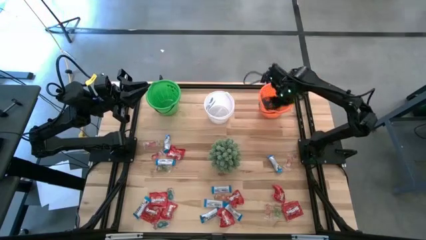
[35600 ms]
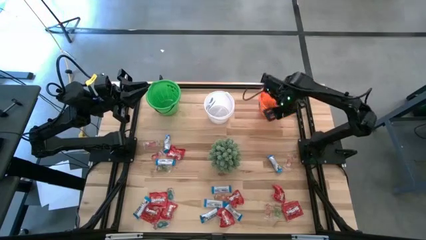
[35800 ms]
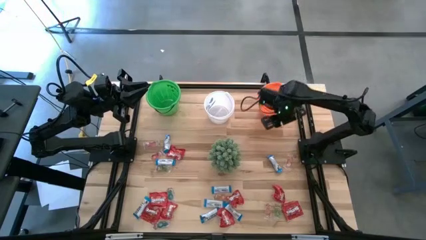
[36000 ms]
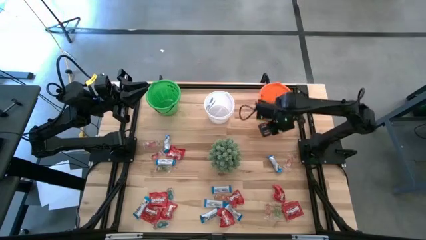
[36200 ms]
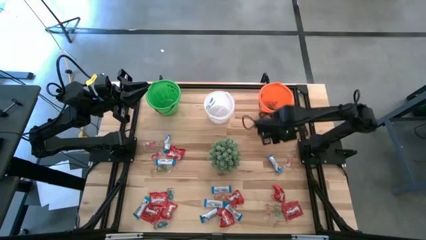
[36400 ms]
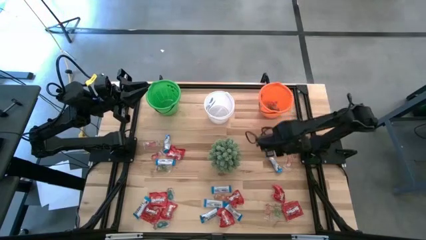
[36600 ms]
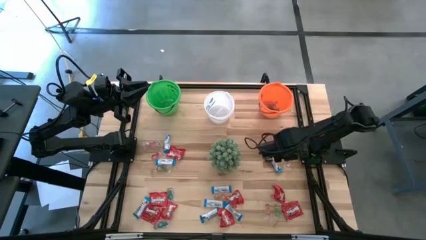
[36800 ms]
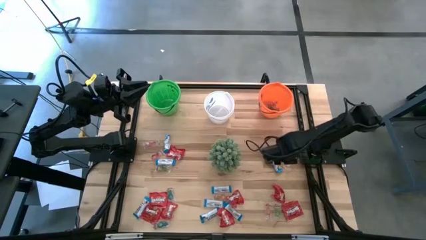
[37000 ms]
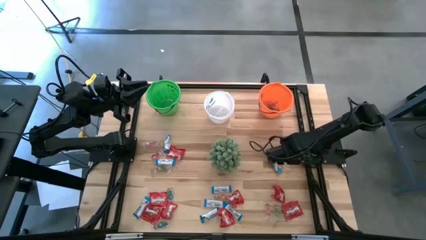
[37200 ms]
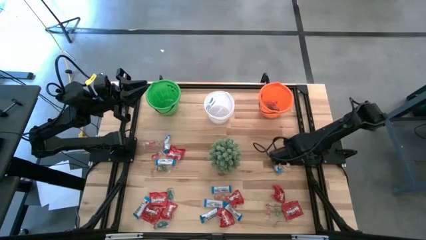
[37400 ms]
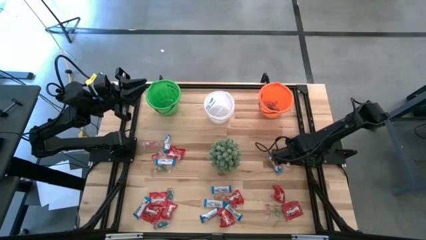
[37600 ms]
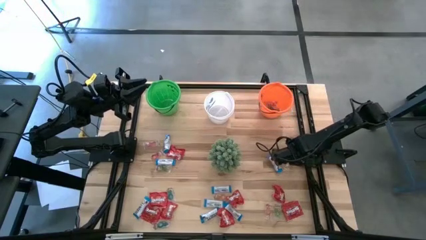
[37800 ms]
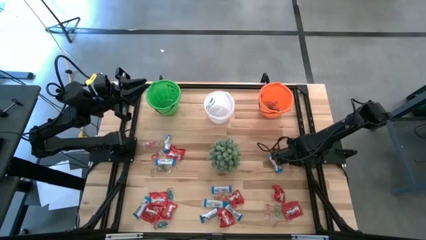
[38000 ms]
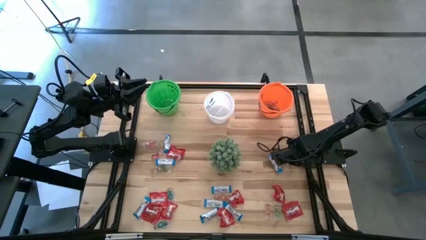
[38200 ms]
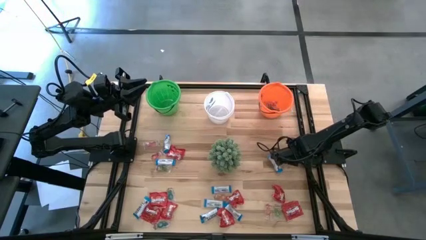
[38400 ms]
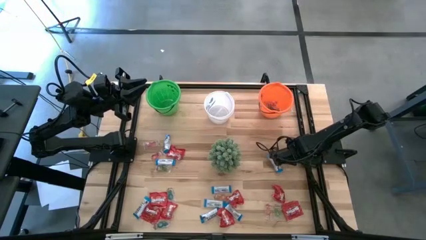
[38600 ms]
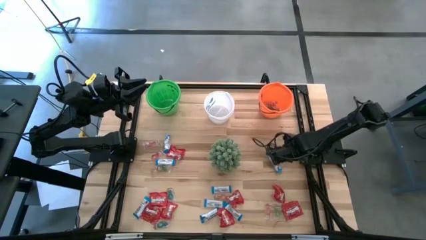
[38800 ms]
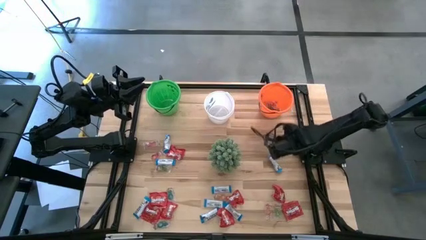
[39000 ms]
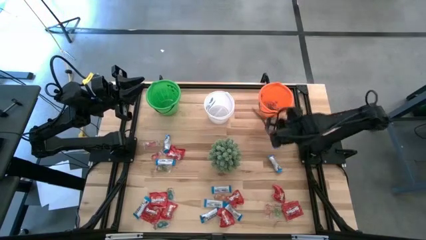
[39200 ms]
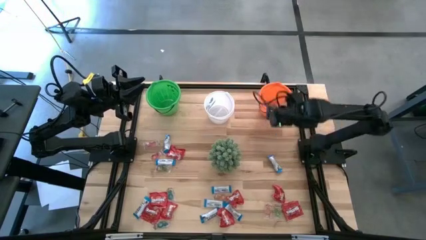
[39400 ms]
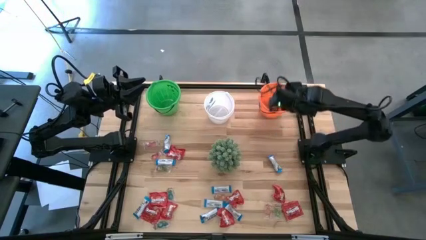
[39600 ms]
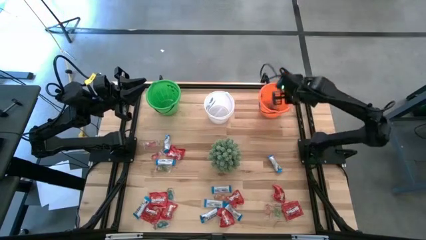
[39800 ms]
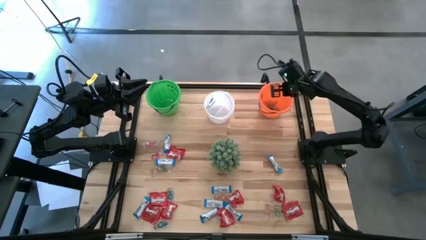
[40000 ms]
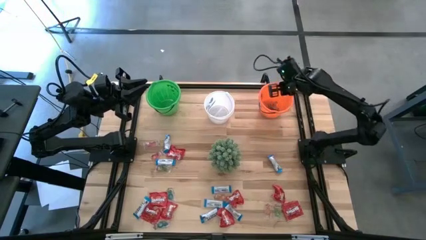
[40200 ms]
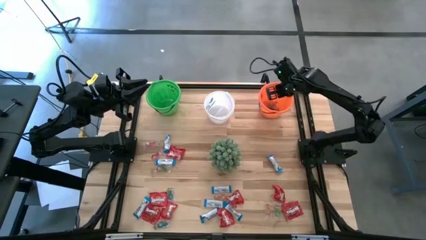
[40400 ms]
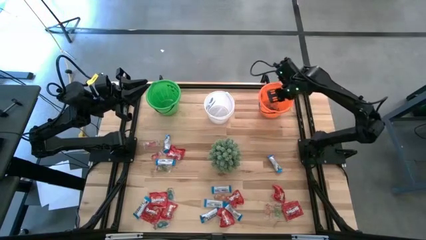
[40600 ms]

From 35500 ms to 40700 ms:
Task: Sort candy
Put the transparent candy into the orange bucket

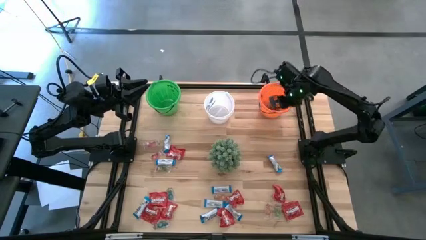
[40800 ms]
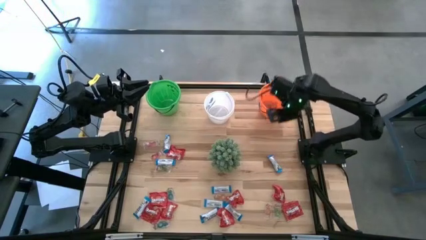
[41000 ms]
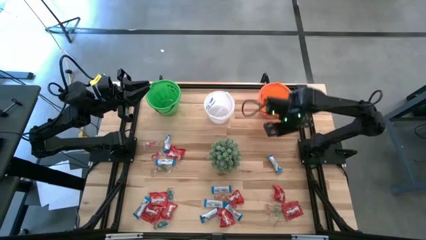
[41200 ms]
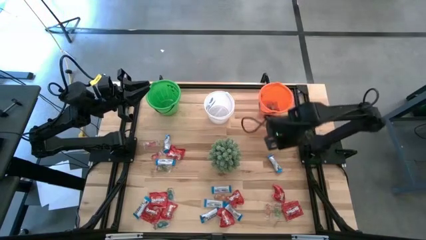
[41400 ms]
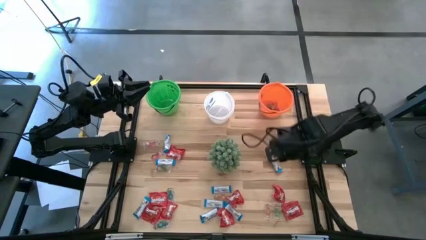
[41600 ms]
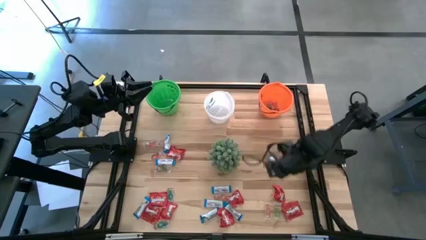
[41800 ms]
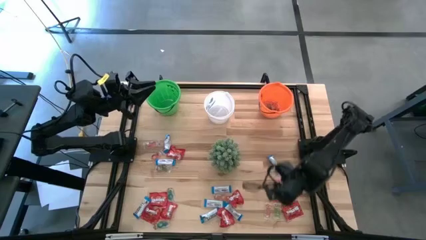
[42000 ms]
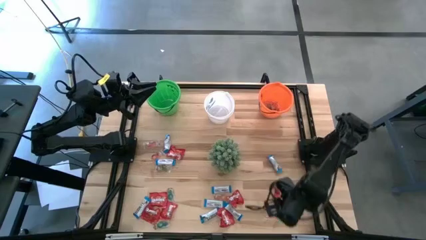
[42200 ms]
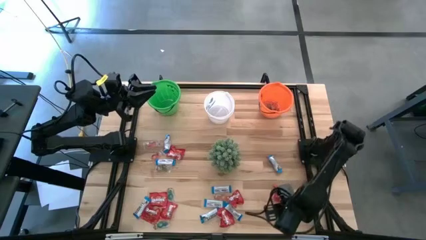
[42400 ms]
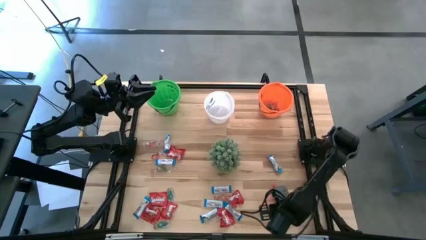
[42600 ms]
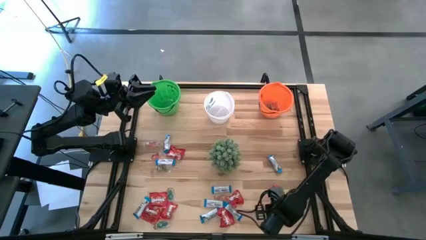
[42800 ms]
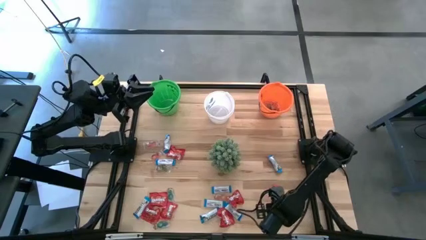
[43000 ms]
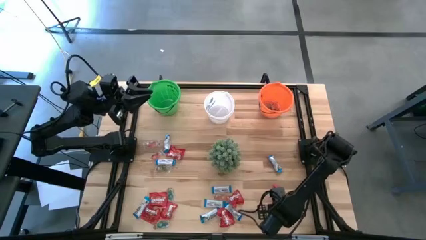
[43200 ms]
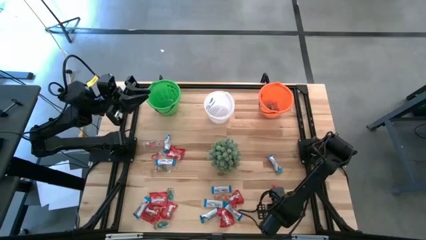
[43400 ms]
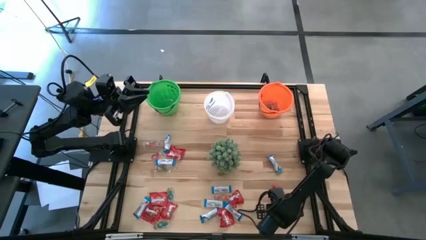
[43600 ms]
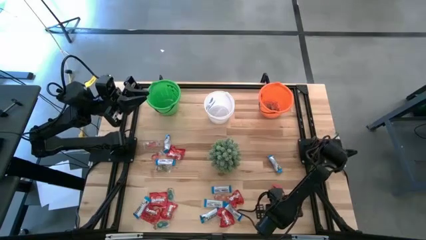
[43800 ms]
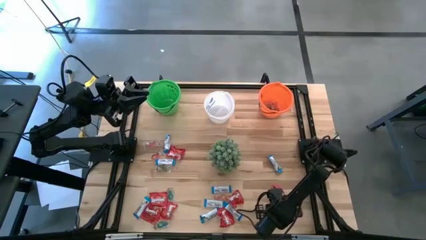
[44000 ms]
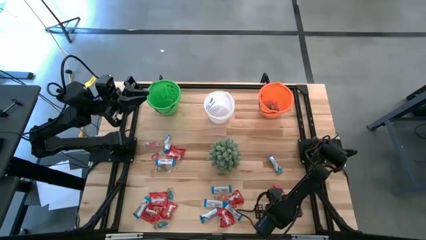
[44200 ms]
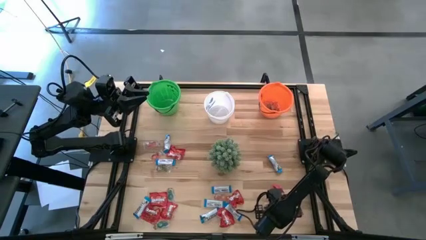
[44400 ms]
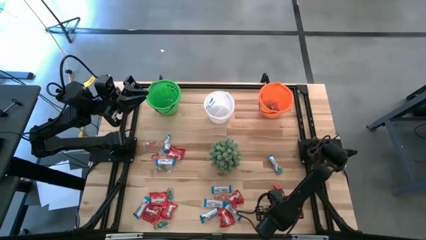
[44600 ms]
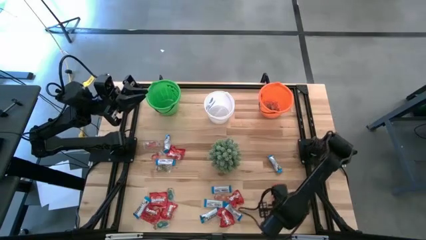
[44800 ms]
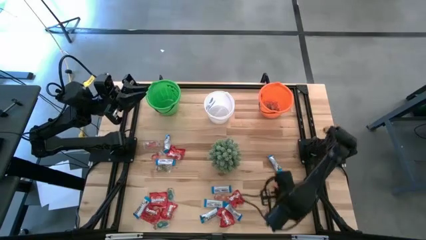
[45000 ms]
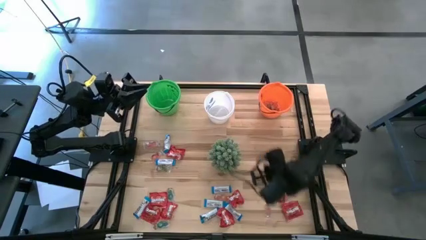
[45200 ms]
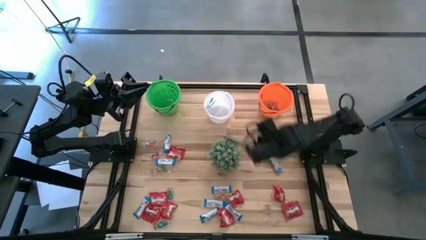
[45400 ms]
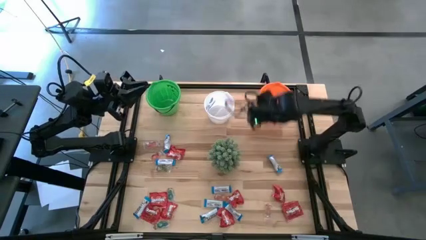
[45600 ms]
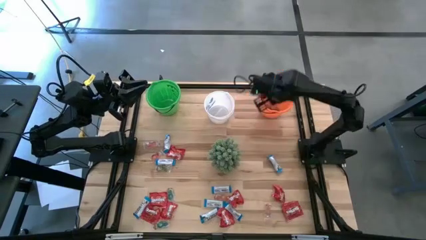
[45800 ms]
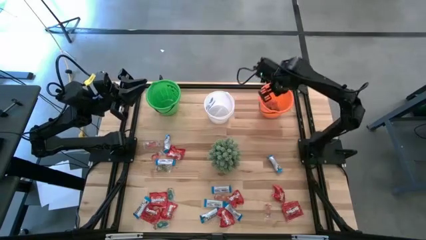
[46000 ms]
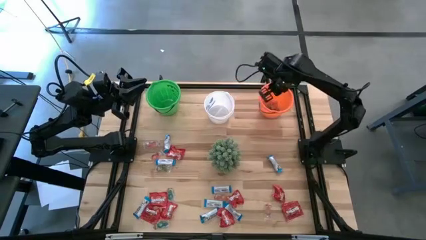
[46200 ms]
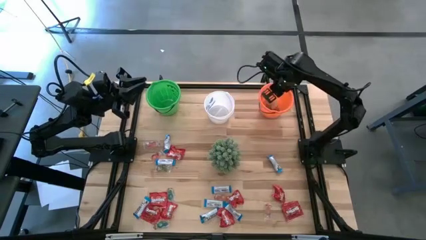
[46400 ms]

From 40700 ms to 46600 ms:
Put the transparent candy into the orange bucket

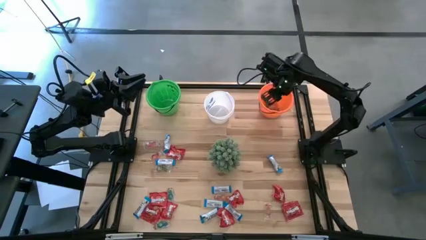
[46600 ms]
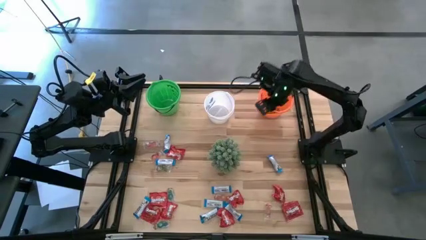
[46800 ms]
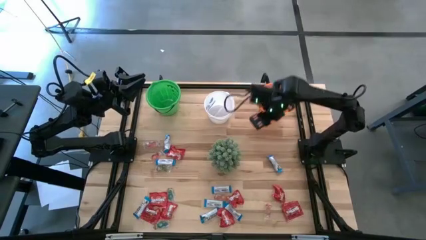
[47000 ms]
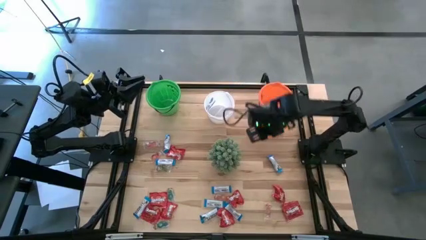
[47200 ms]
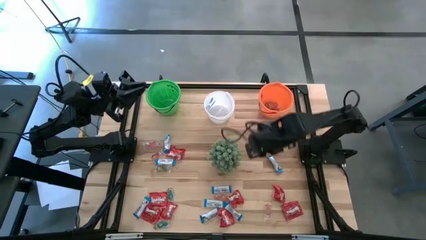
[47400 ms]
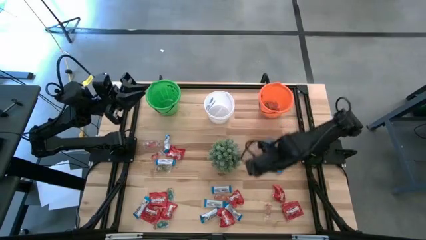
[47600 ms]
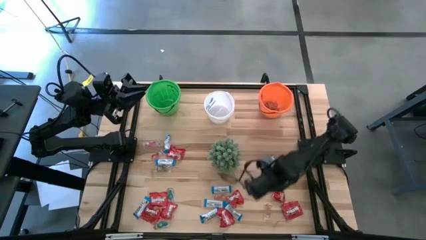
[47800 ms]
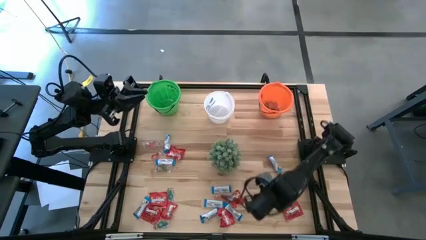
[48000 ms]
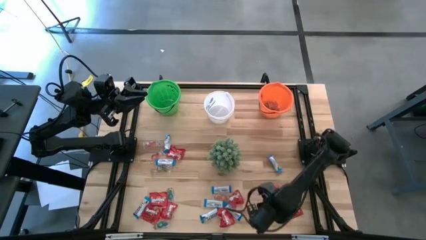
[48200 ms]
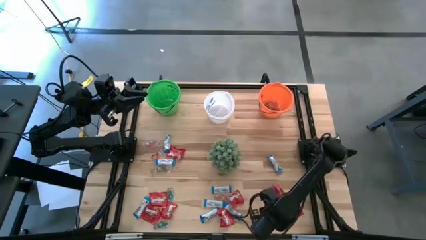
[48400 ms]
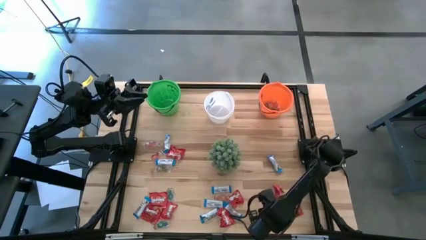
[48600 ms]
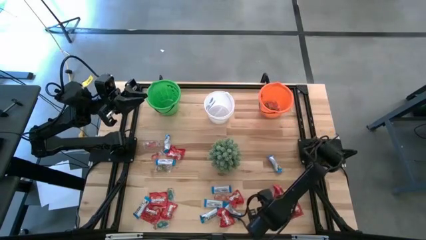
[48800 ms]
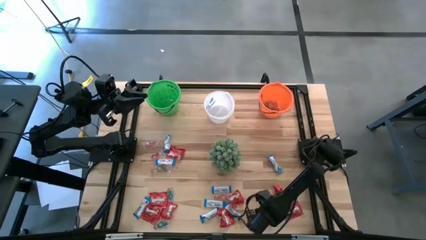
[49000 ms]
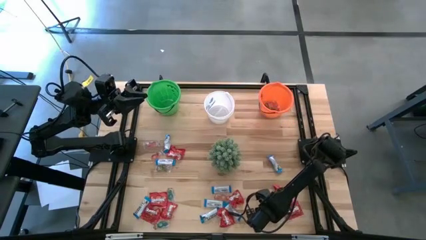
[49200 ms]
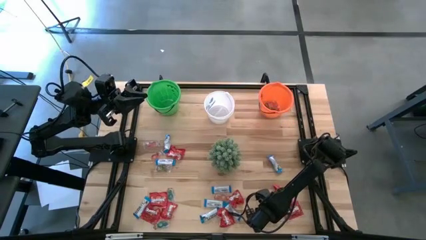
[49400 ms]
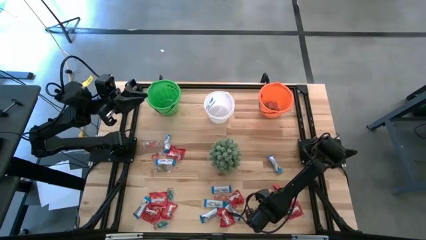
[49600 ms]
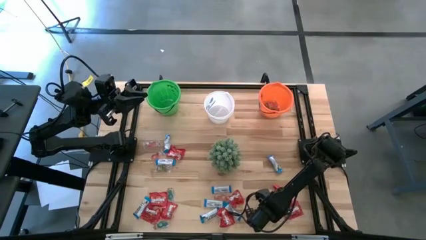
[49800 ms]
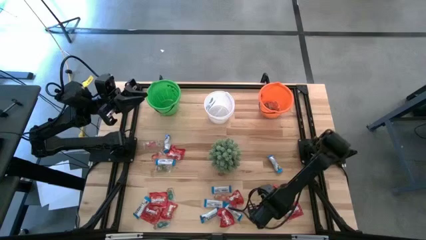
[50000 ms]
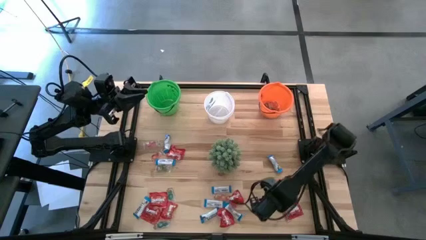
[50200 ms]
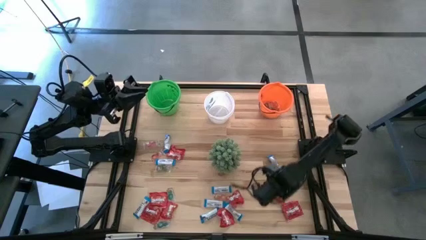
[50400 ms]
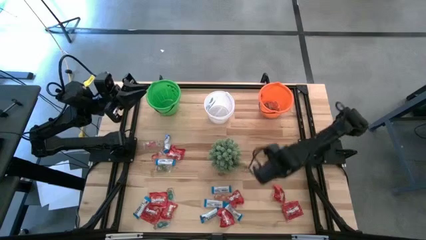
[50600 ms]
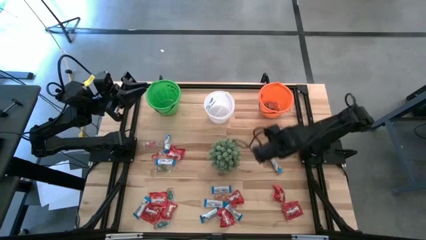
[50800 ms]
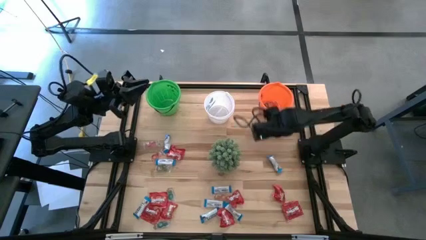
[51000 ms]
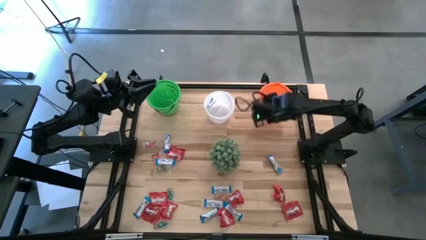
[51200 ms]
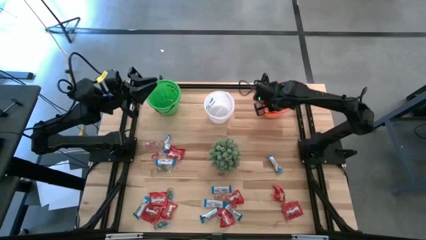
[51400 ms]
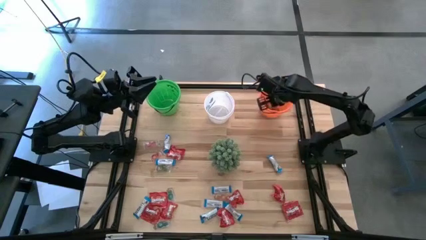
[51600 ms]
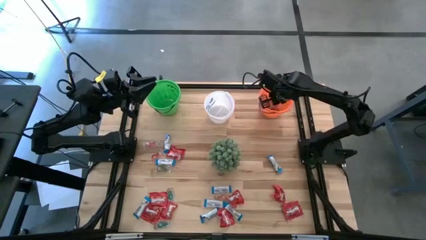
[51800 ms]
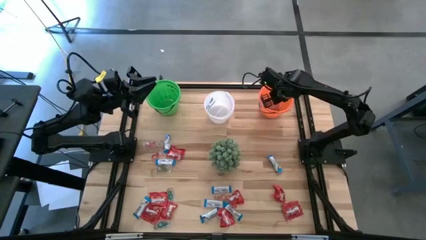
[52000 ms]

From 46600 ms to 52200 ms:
Put the transparent candy into the orange bucket
